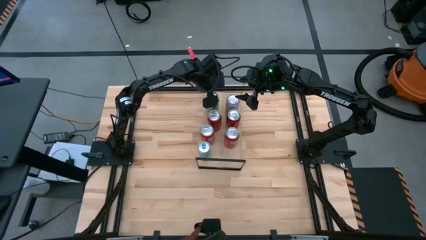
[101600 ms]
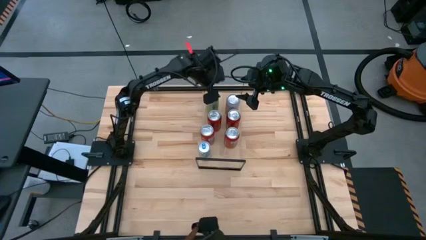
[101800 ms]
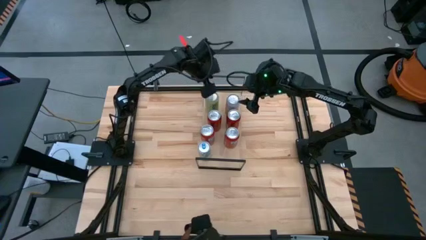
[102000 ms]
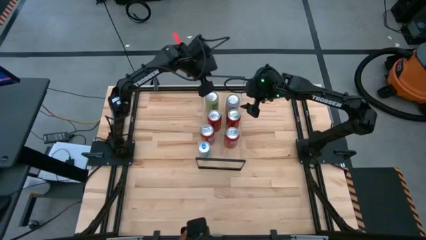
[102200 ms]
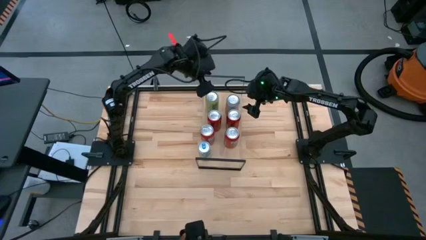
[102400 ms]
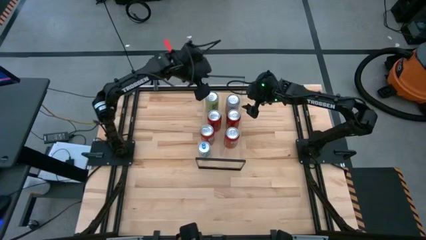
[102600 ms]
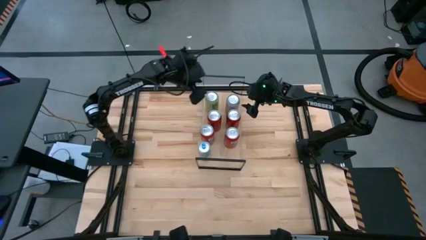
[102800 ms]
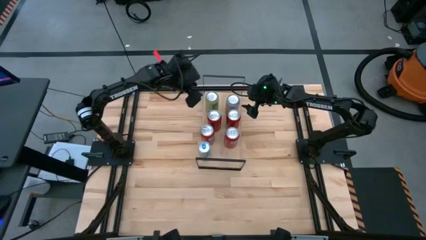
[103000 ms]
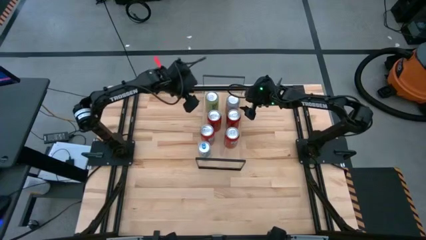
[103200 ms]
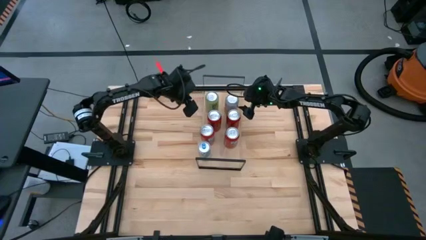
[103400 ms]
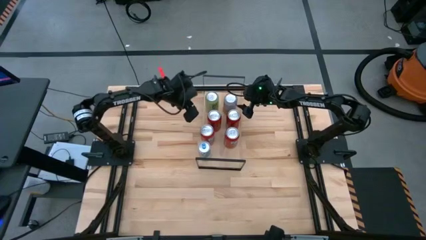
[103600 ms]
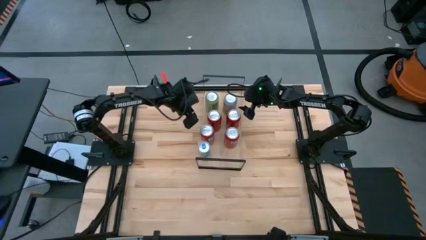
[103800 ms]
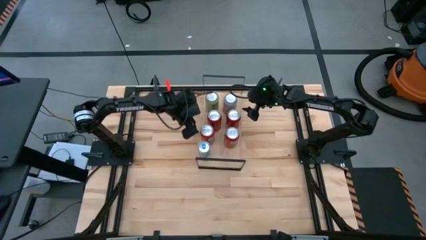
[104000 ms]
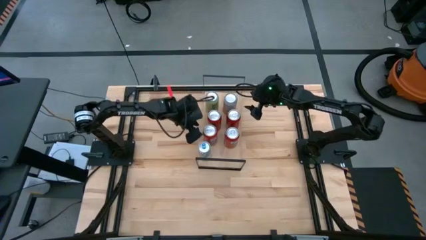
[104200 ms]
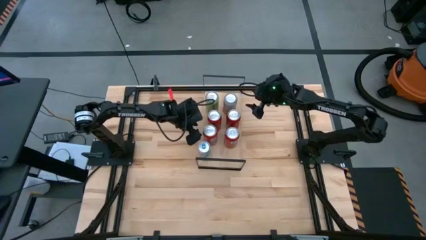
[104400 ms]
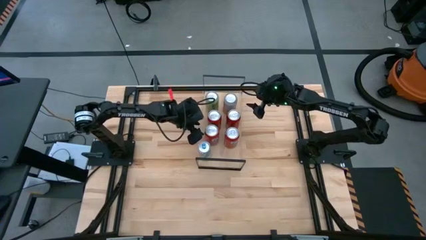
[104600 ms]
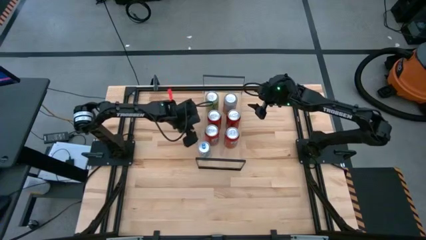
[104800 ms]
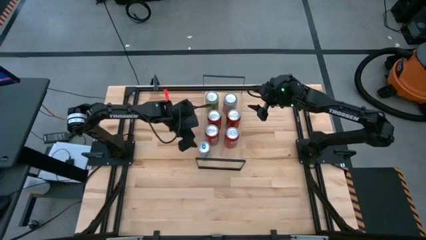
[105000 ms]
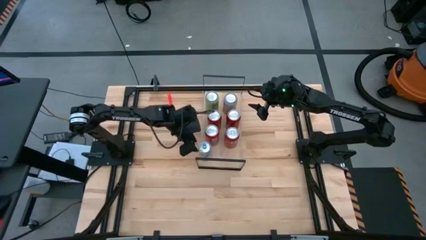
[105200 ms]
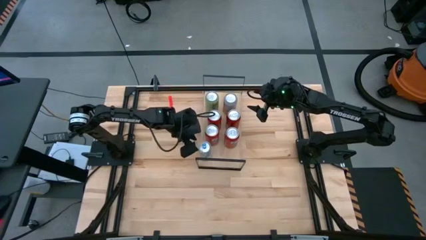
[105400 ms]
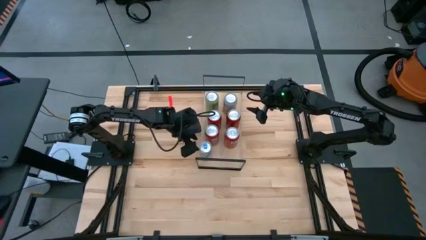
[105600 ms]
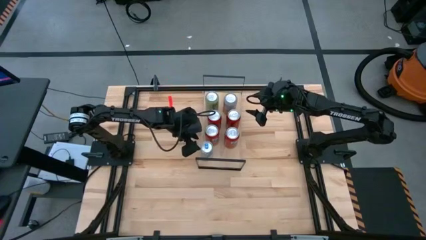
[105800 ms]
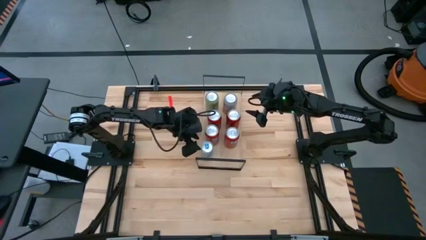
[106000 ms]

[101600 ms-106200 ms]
Task: Place canned beverage on shelf
Adjust the soda cans on the shelf

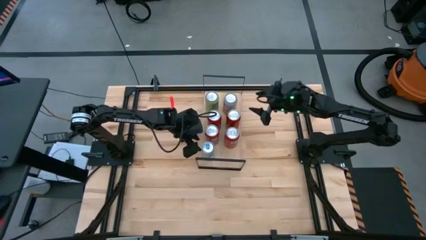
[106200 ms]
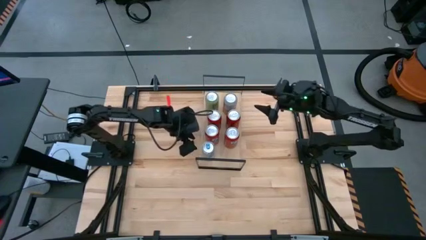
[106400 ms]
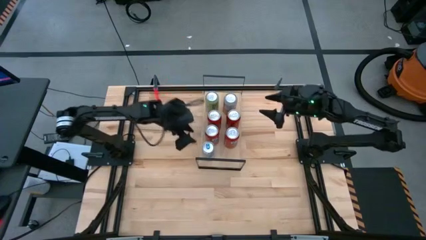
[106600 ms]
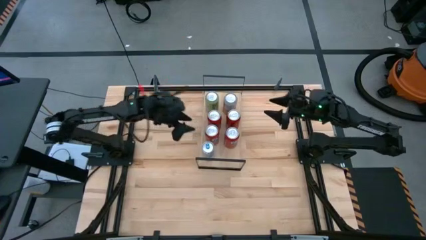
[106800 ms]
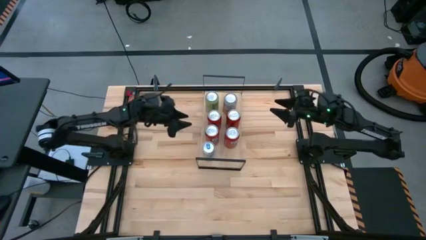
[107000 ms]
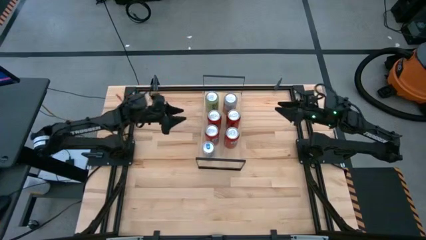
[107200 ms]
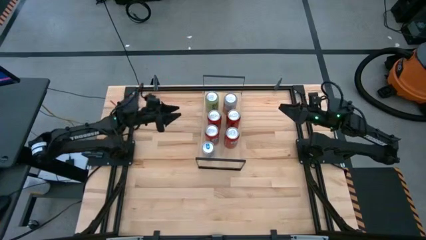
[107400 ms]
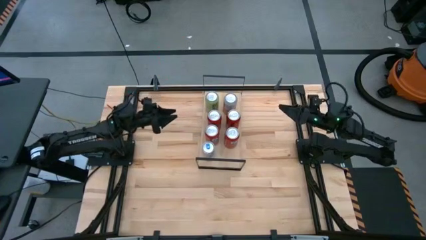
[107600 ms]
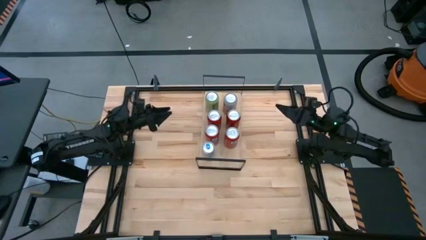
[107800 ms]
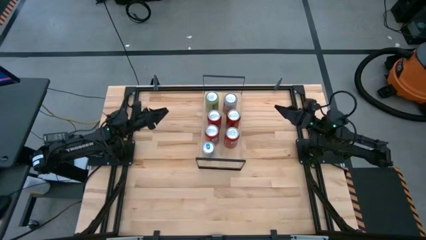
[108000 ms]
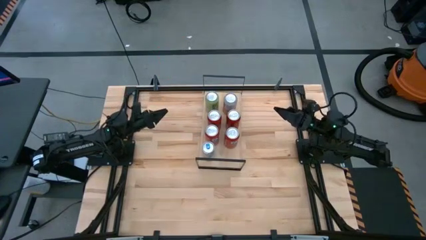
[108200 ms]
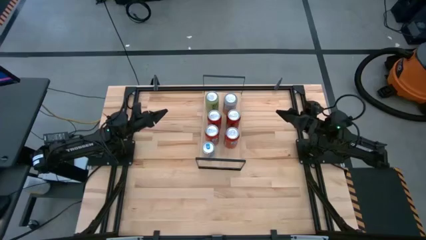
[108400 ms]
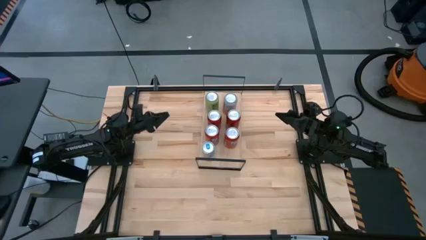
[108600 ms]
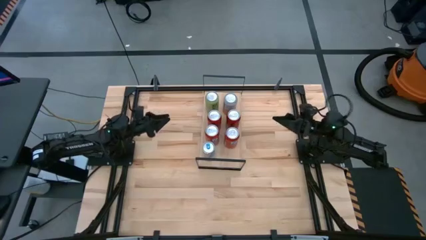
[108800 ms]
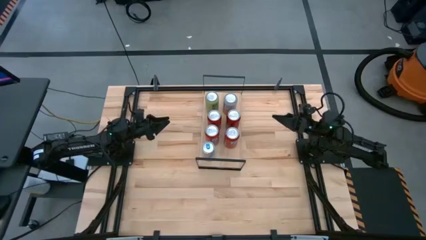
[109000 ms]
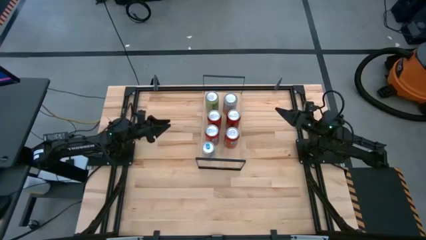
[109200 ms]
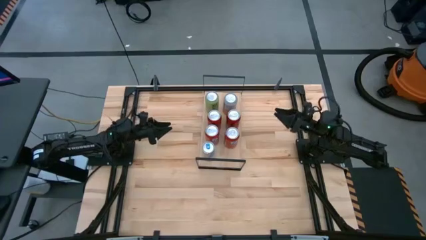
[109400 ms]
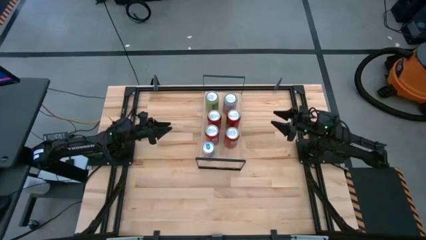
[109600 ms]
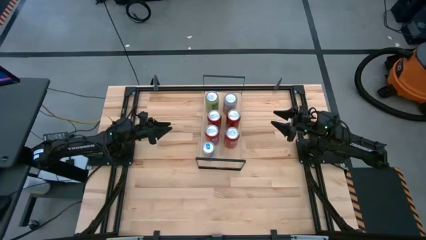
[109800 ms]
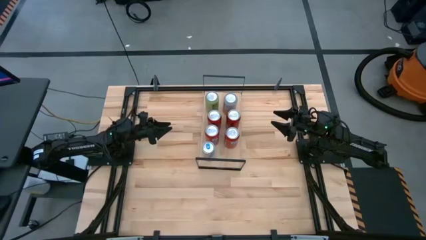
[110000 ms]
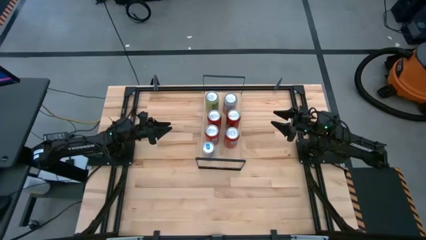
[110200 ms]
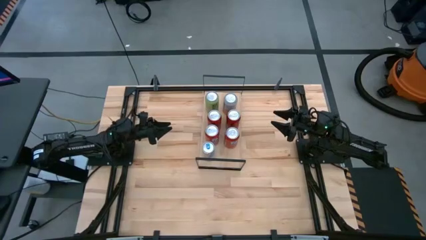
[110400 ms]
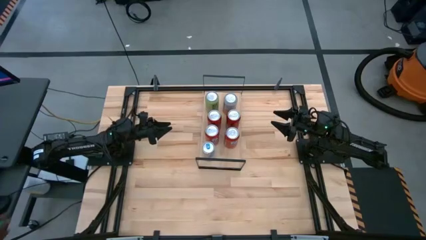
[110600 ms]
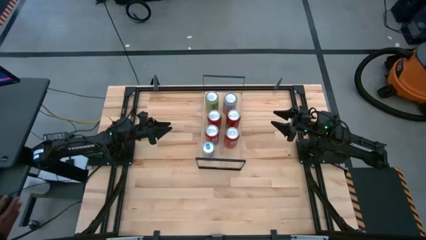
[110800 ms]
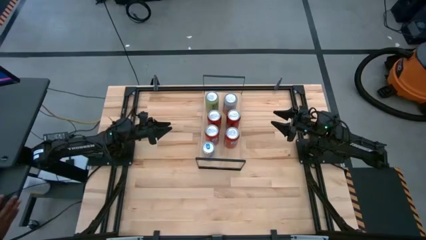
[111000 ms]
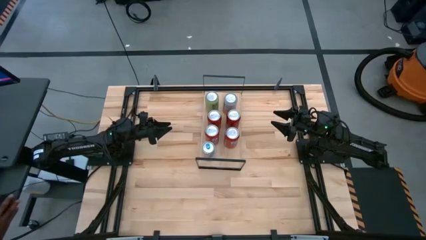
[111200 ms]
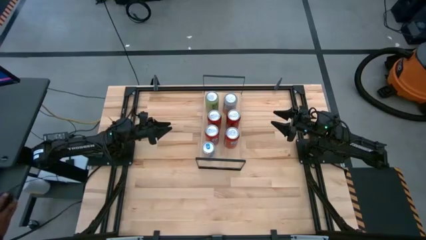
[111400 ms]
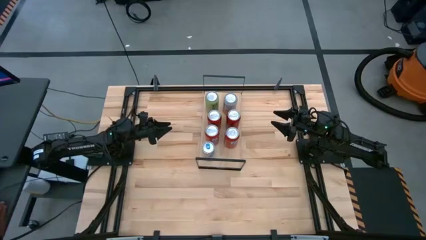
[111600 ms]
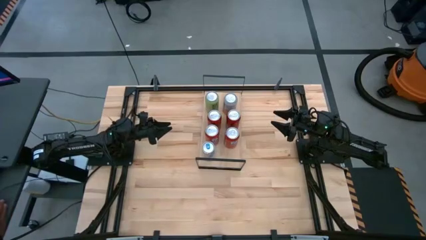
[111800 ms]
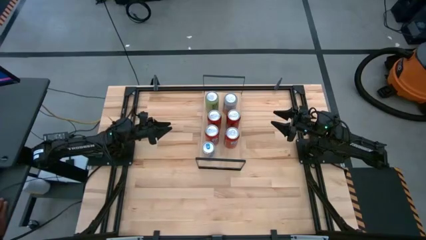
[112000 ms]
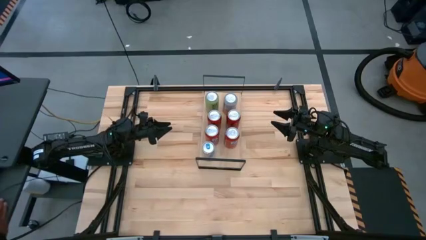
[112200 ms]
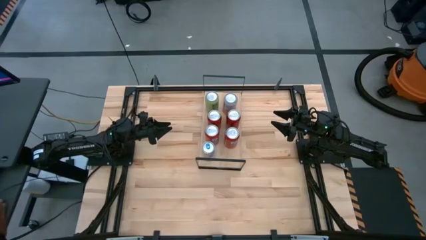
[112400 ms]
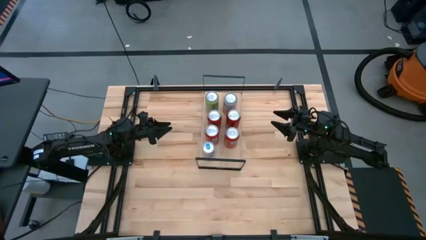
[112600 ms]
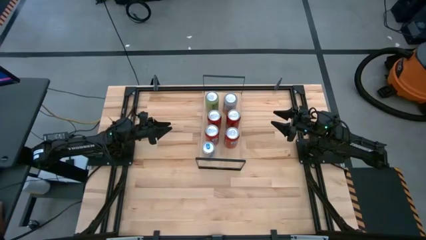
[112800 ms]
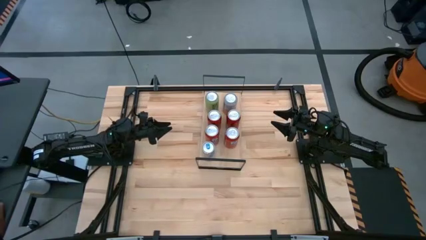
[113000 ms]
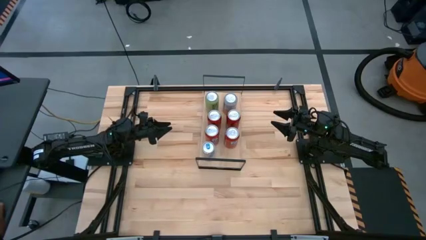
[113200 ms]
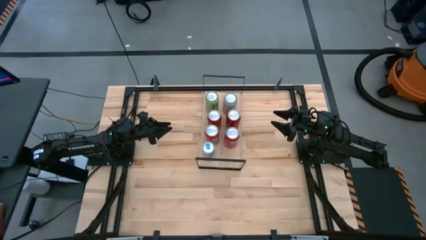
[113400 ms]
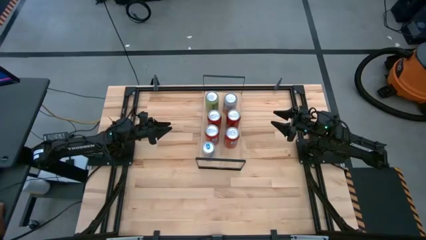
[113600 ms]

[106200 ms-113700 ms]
Return to Home Position
